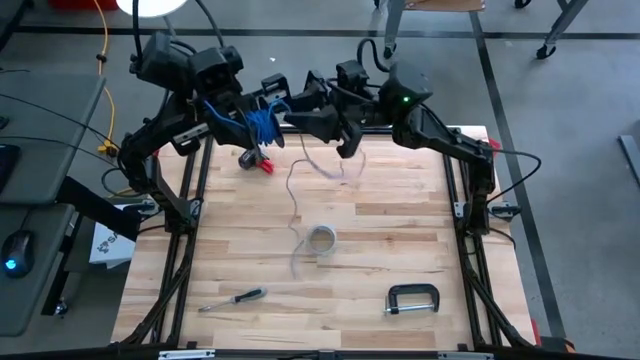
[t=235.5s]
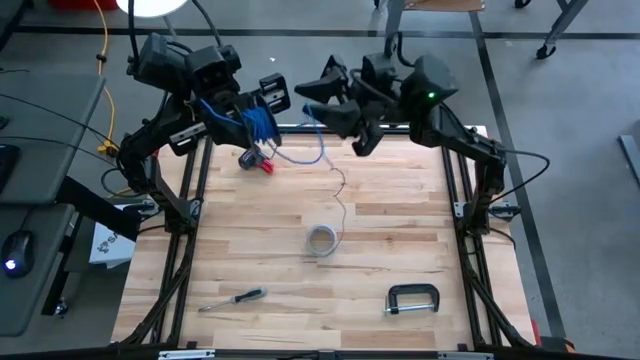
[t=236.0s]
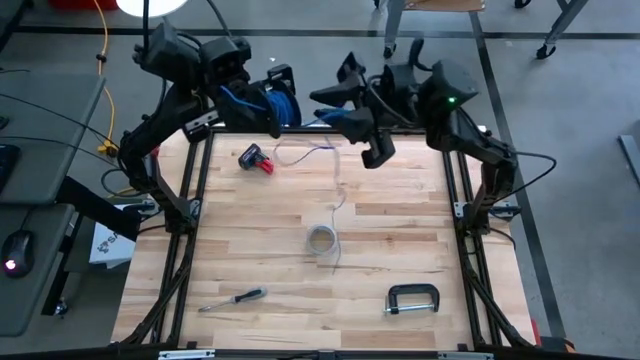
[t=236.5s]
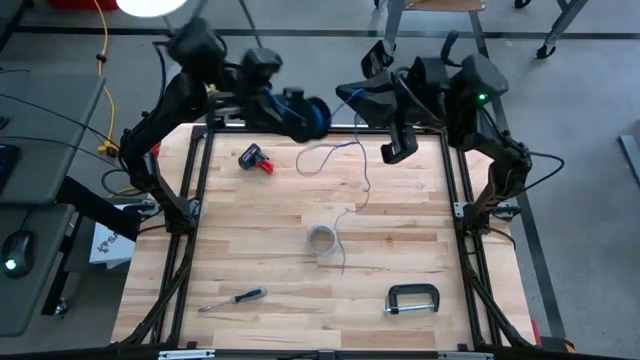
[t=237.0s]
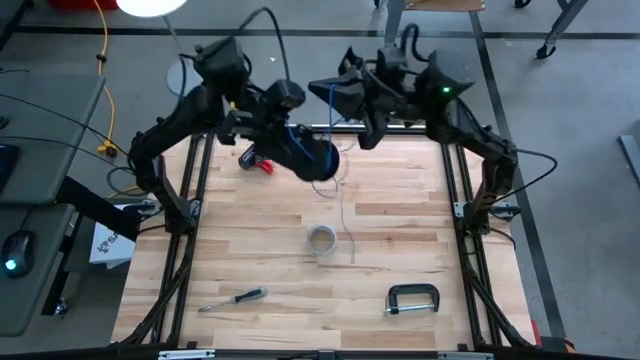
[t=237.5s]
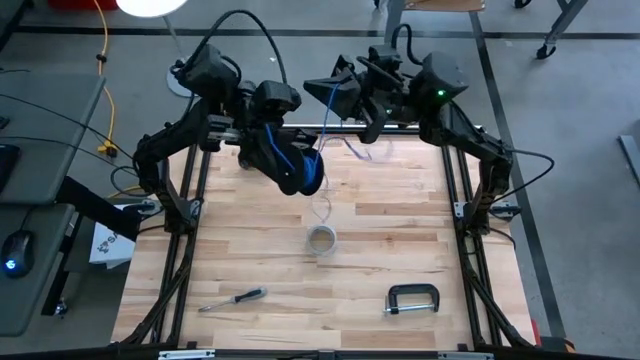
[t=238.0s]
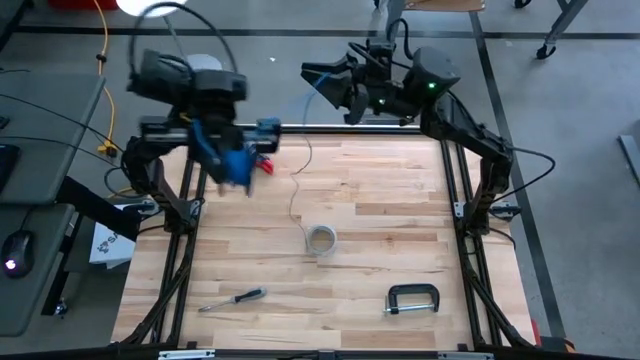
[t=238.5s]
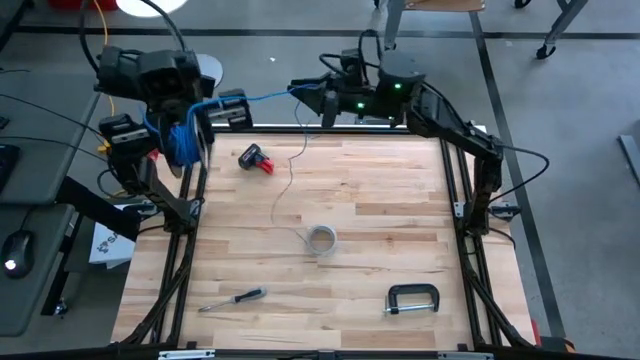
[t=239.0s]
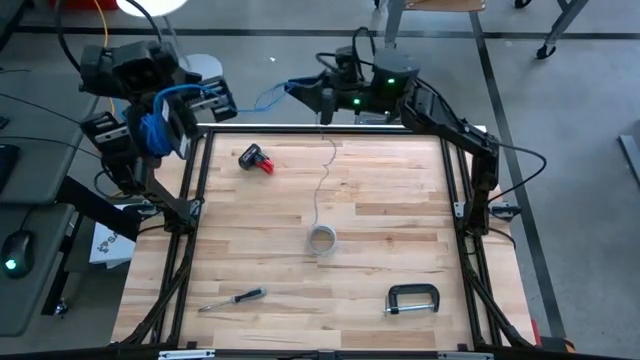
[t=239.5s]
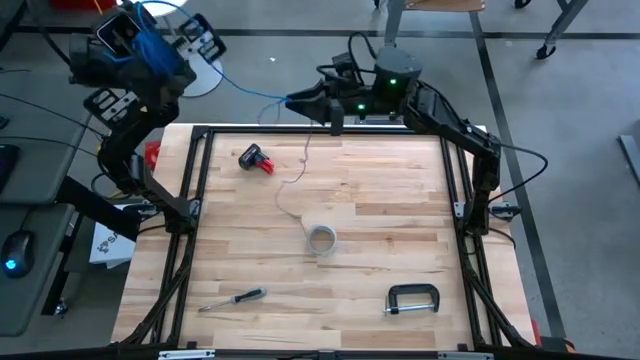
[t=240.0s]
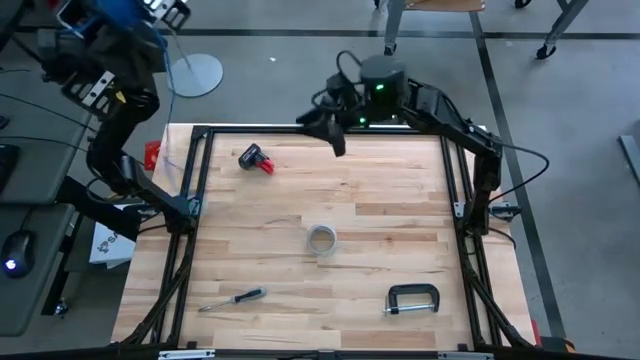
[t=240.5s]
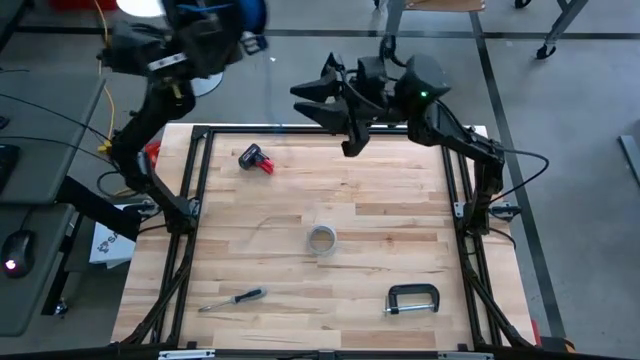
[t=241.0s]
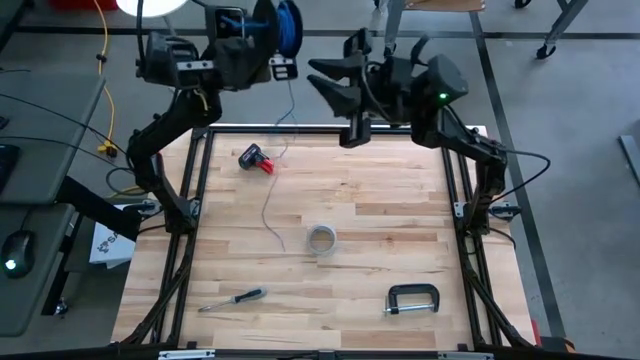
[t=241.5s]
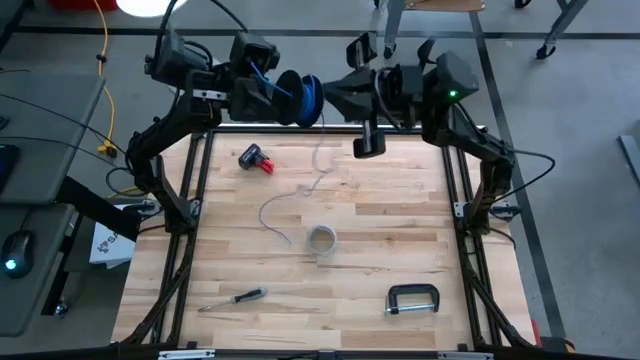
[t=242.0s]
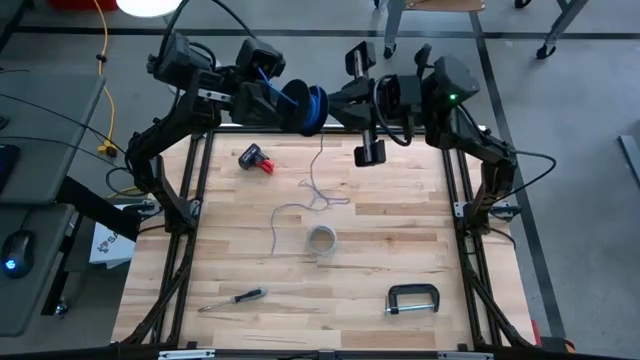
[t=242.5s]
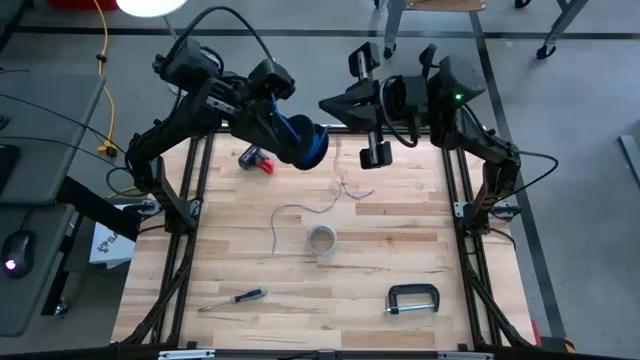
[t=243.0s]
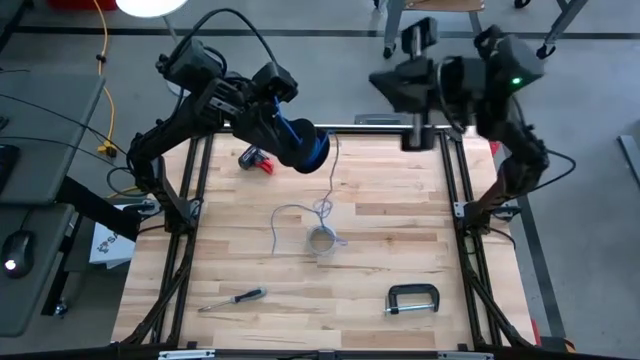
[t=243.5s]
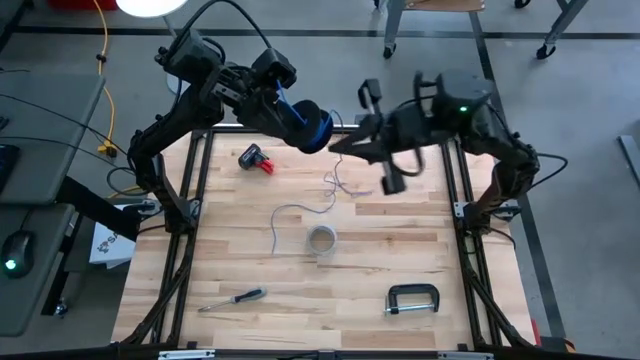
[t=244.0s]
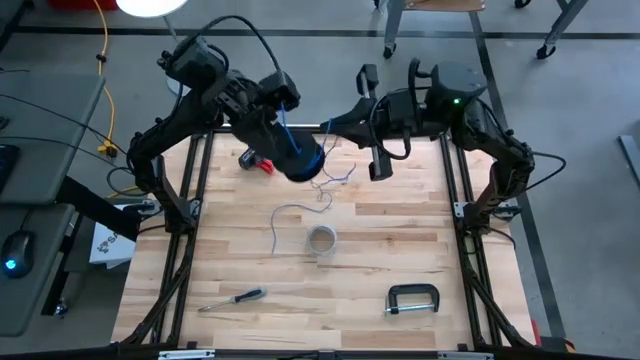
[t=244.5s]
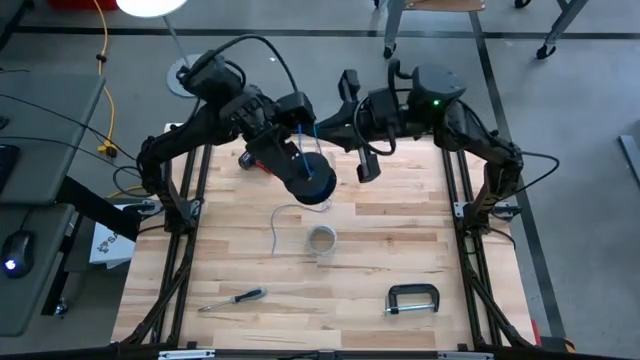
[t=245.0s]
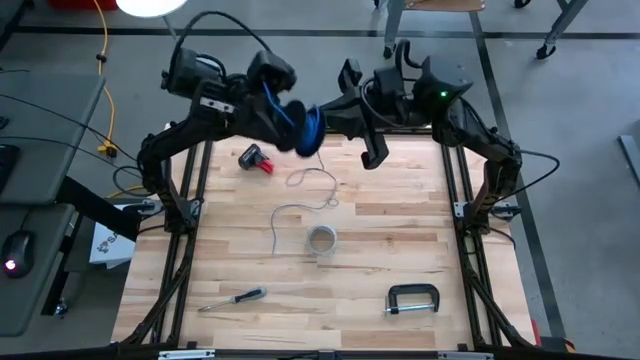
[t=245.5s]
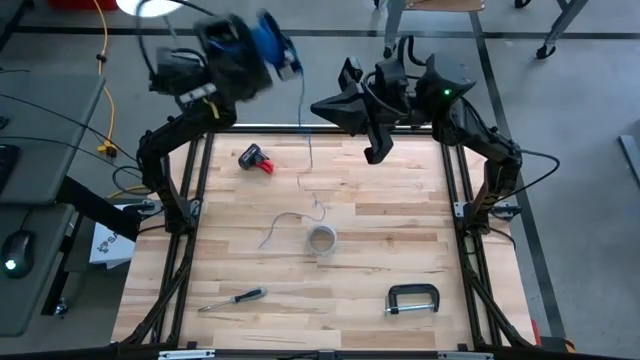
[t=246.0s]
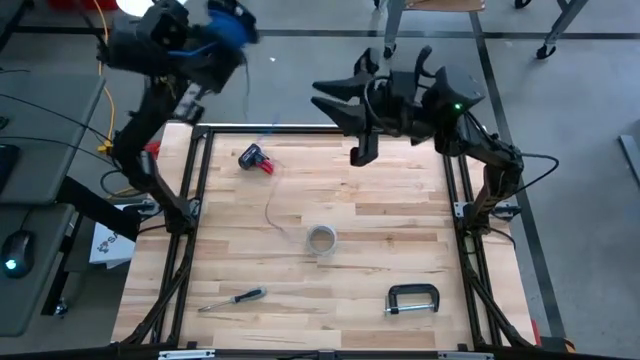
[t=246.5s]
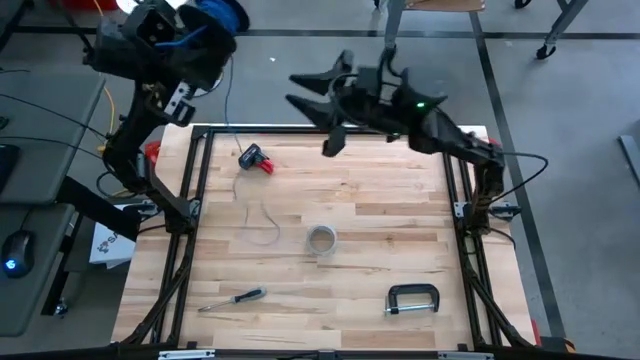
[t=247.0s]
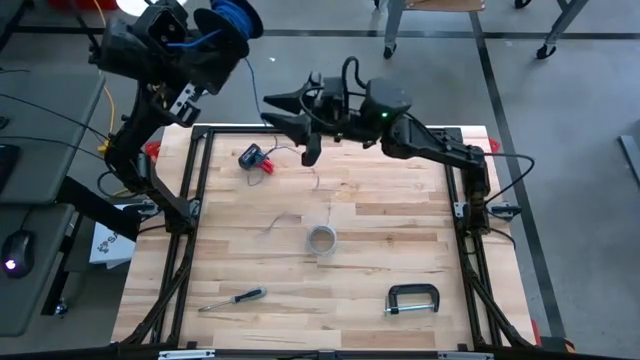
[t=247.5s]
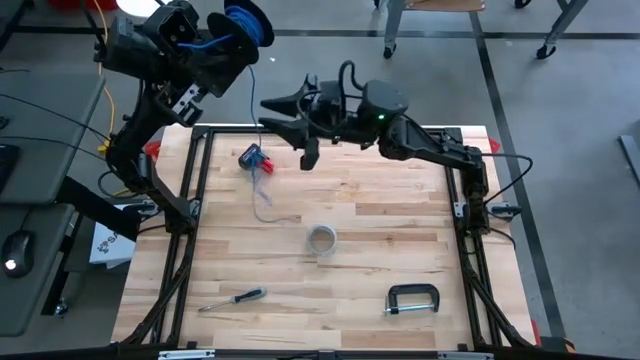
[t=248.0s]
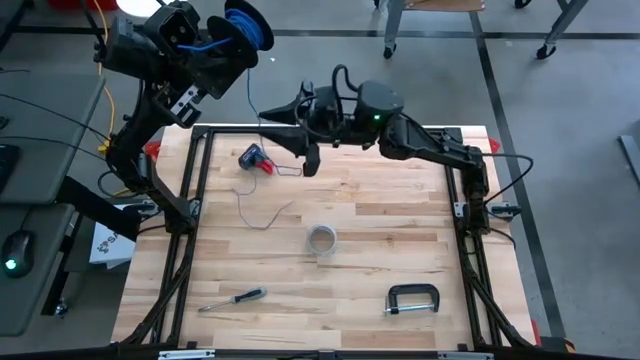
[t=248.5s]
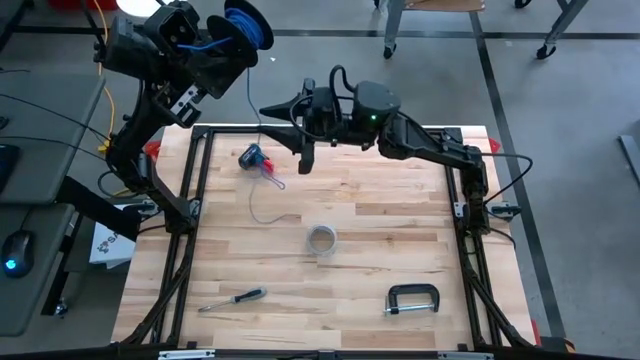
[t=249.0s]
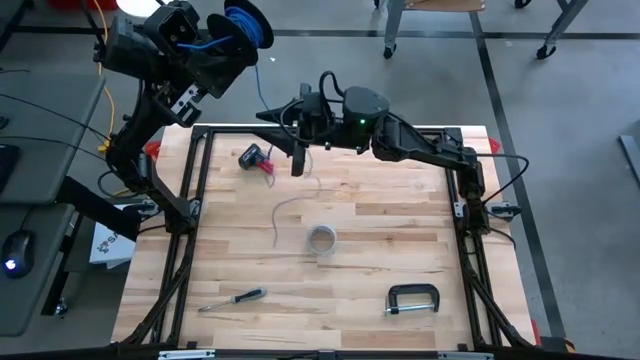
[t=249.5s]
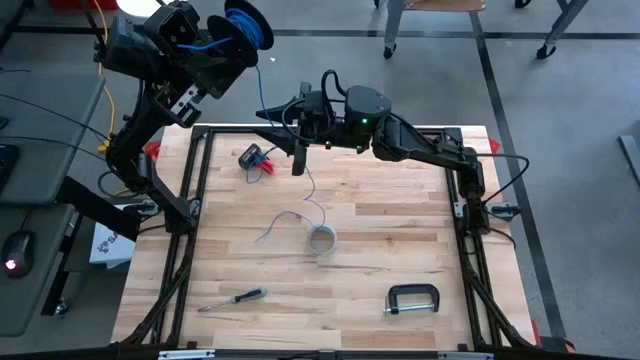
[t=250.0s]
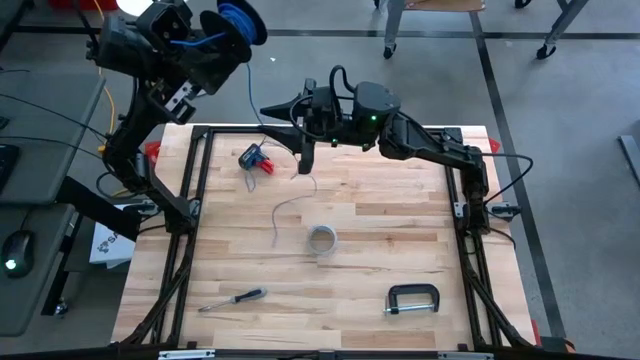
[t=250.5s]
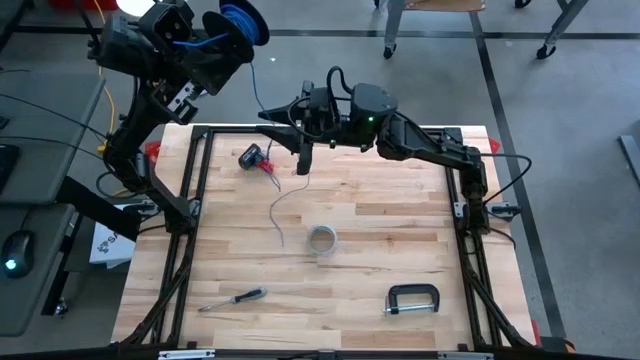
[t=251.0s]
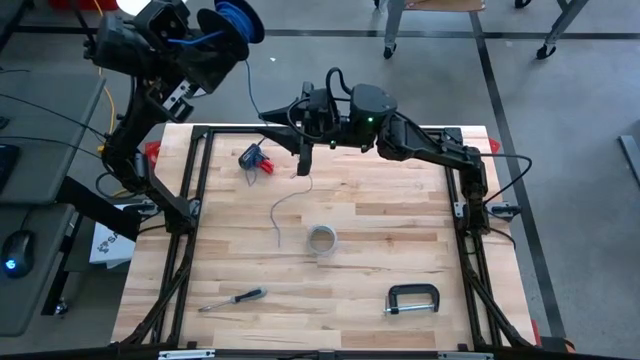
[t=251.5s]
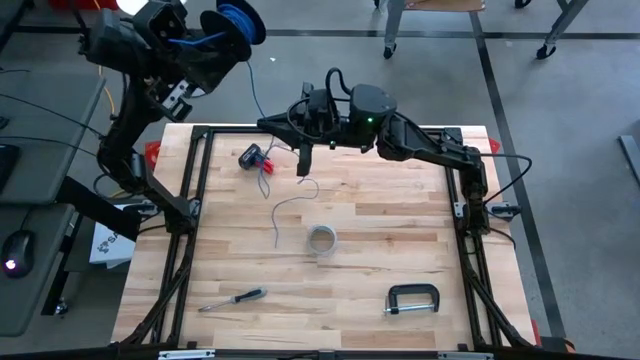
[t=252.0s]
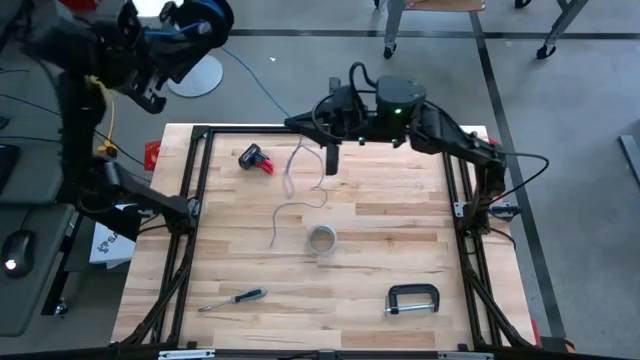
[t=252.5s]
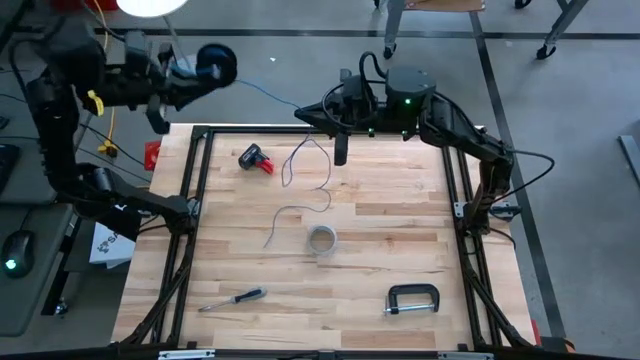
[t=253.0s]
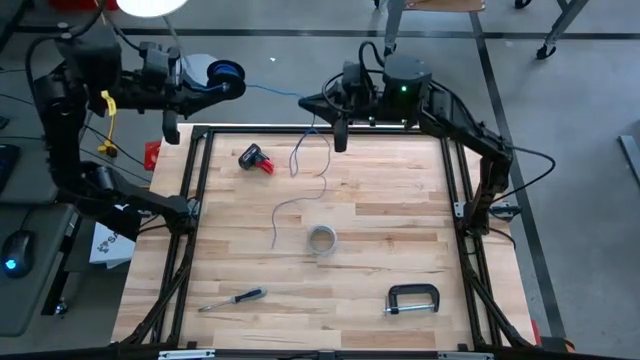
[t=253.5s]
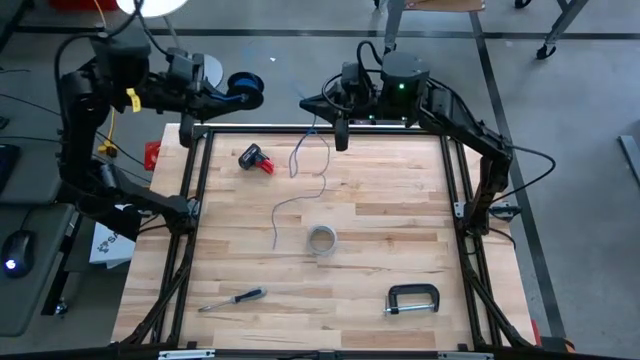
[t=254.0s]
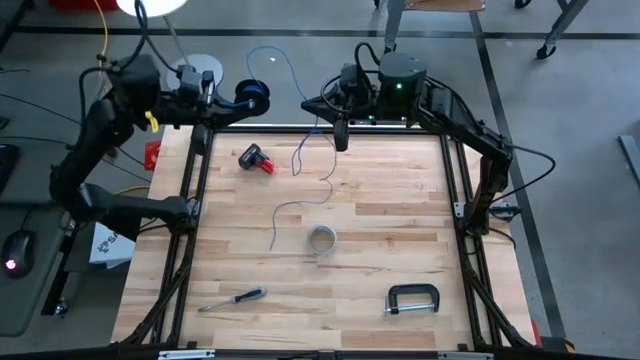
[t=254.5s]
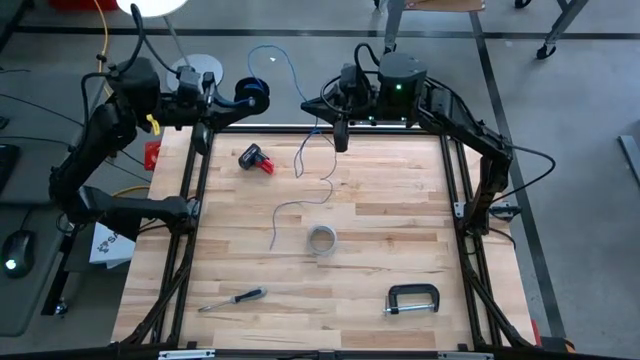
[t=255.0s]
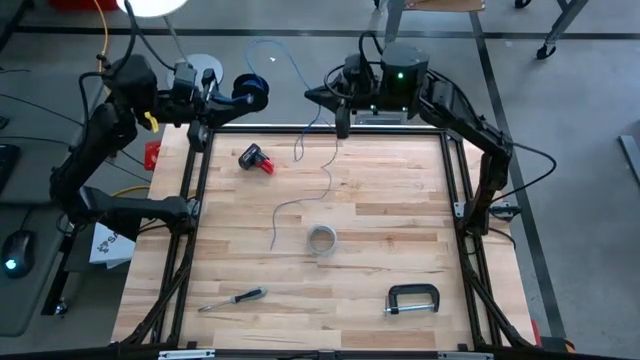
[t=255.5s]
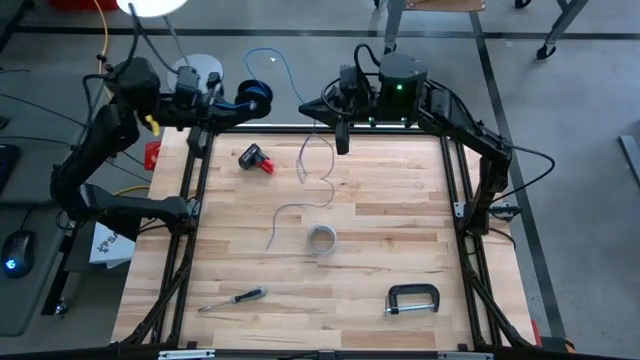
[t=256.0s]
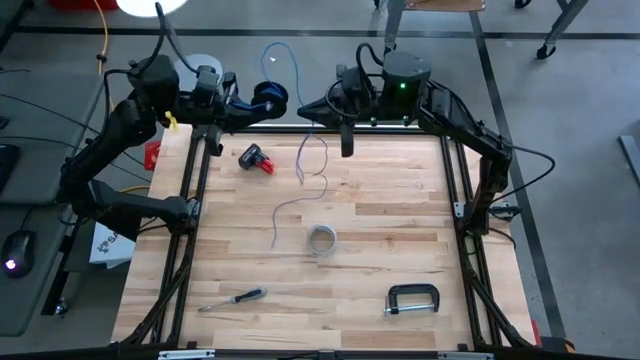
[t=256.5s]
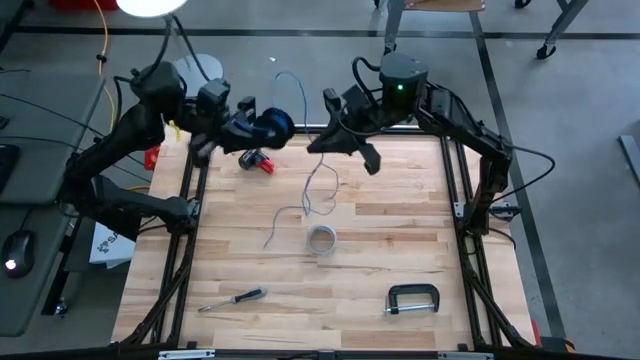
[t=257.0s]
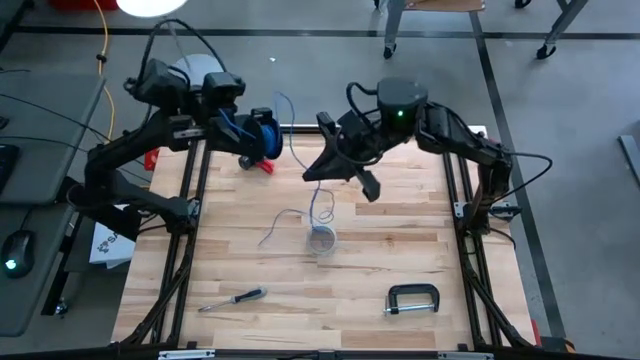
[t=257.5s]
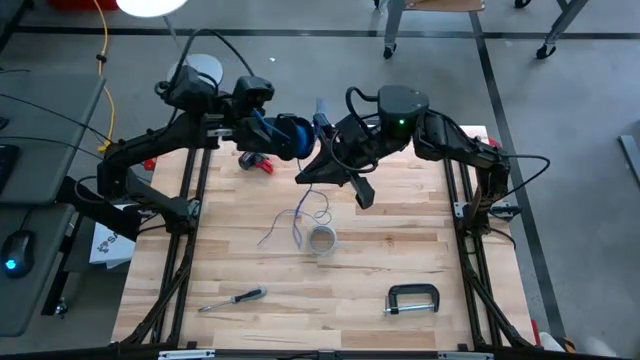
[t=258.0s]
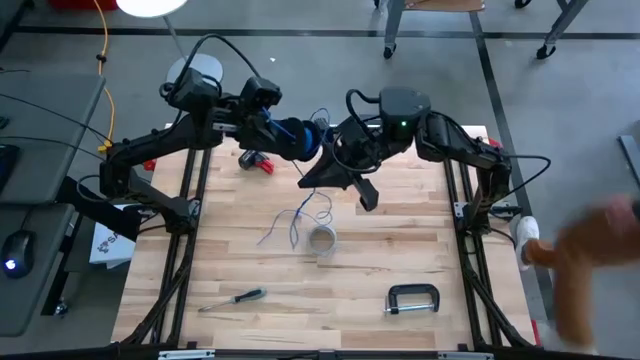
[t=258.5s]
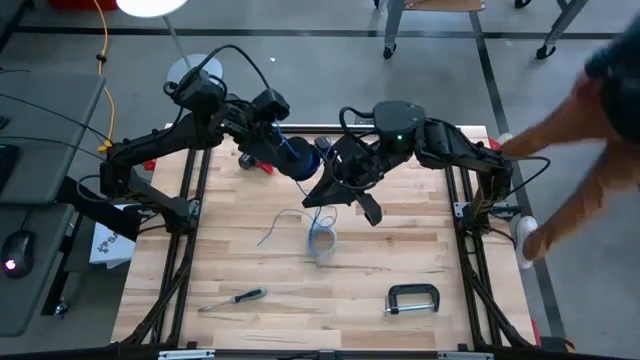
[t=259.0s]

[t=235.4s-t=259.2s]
Task: Coil cords
Coil the blue wire on the spool
